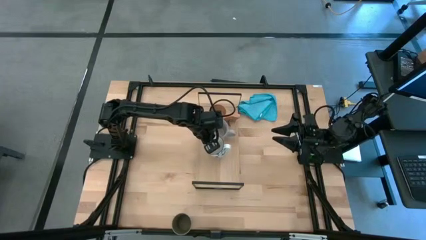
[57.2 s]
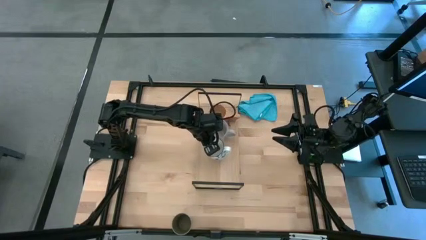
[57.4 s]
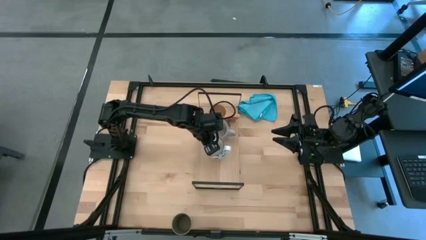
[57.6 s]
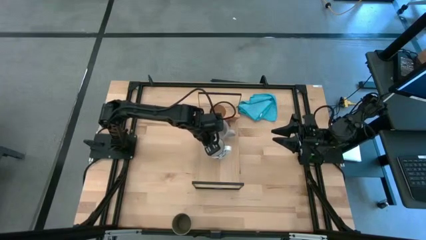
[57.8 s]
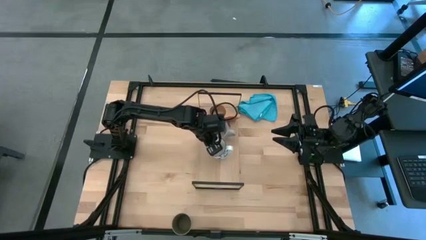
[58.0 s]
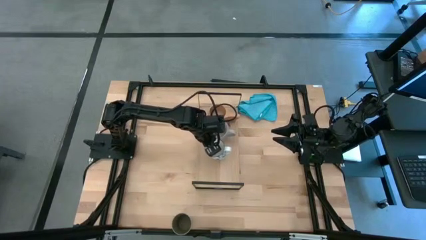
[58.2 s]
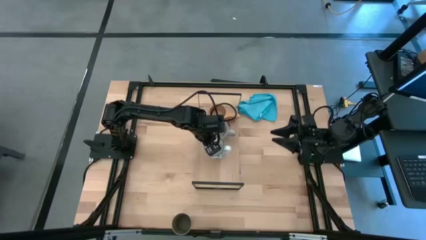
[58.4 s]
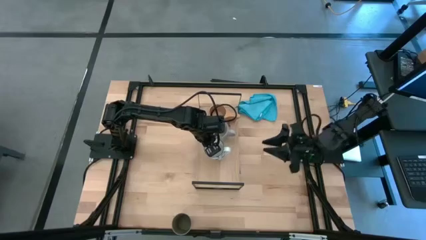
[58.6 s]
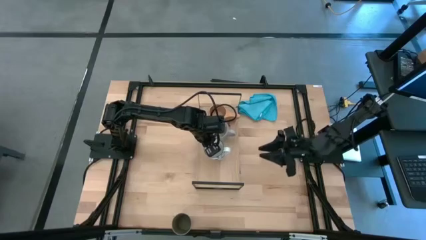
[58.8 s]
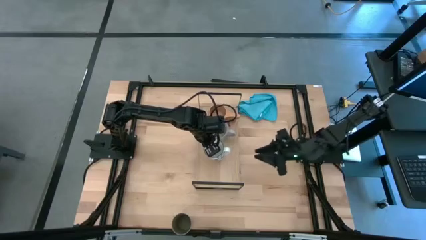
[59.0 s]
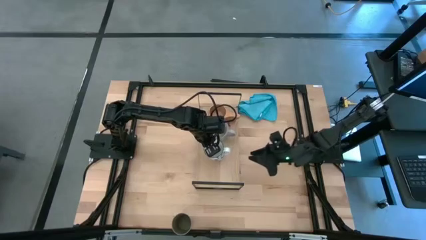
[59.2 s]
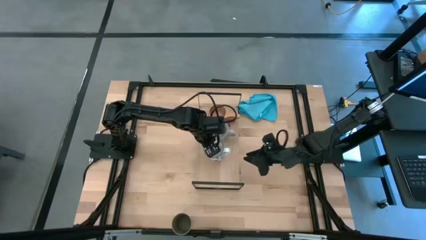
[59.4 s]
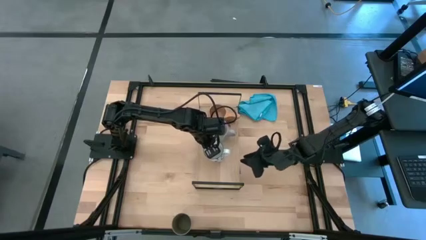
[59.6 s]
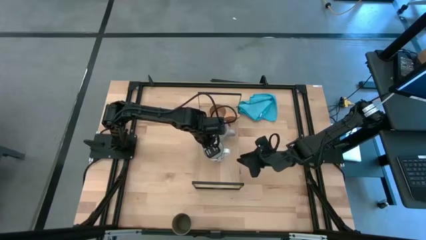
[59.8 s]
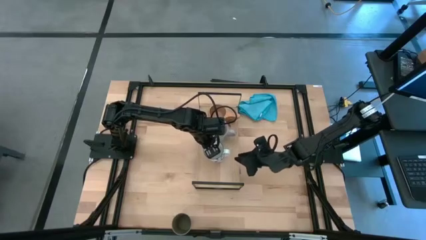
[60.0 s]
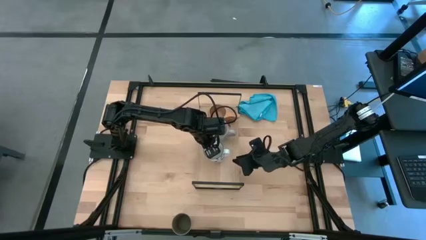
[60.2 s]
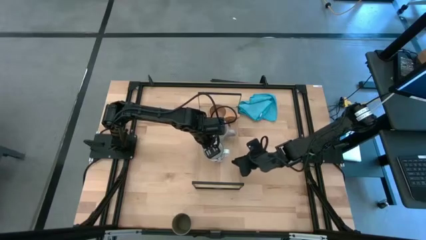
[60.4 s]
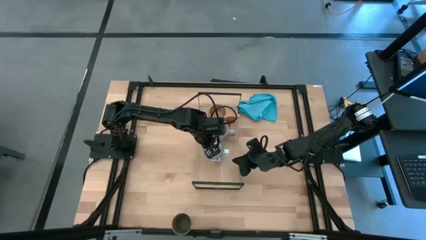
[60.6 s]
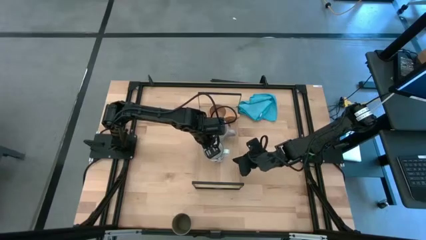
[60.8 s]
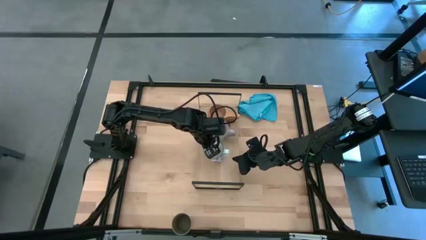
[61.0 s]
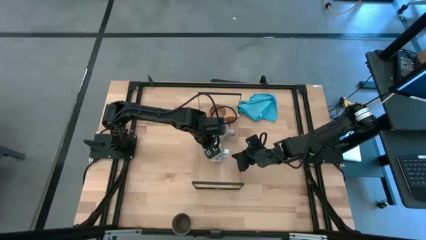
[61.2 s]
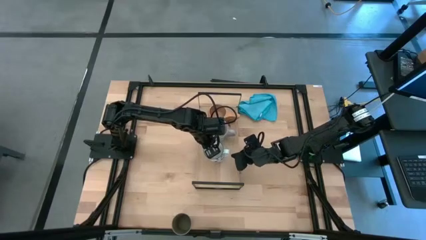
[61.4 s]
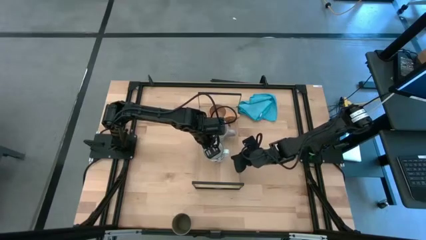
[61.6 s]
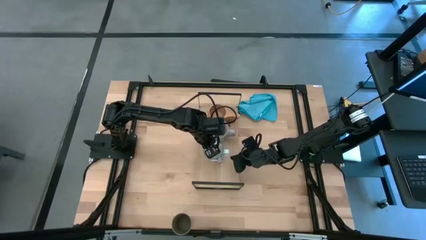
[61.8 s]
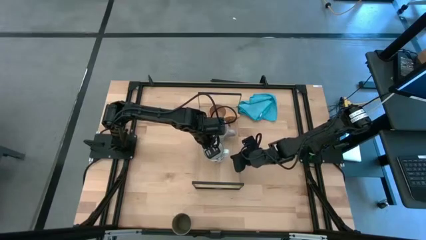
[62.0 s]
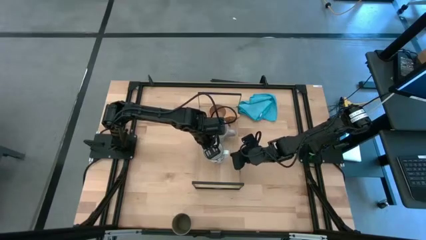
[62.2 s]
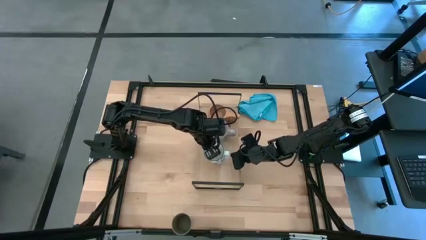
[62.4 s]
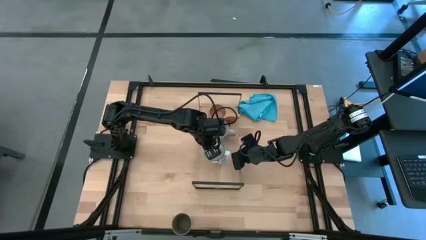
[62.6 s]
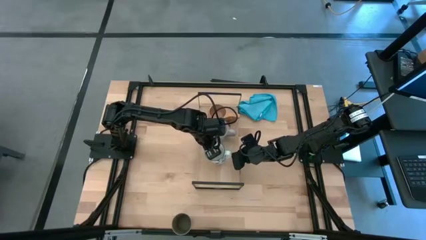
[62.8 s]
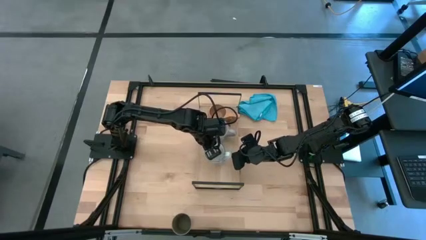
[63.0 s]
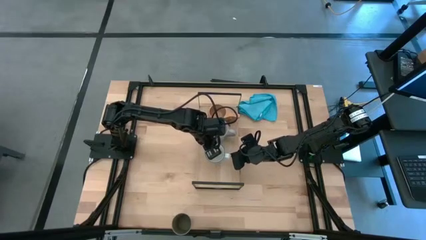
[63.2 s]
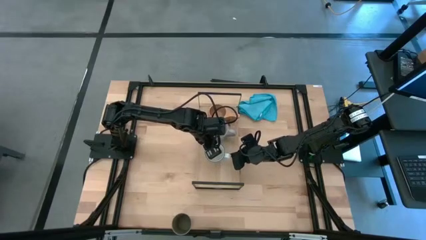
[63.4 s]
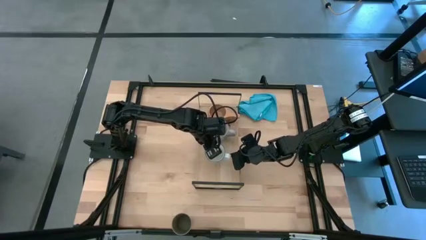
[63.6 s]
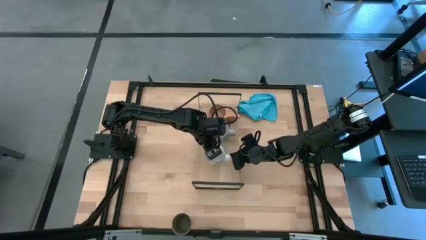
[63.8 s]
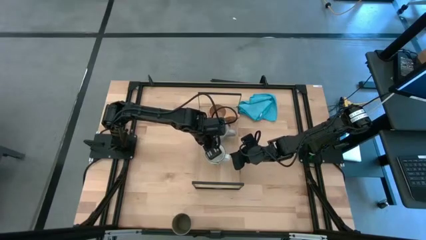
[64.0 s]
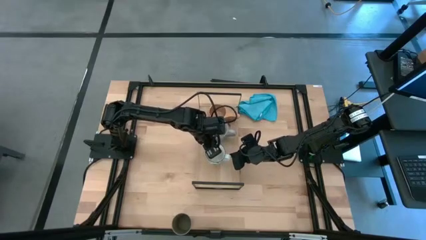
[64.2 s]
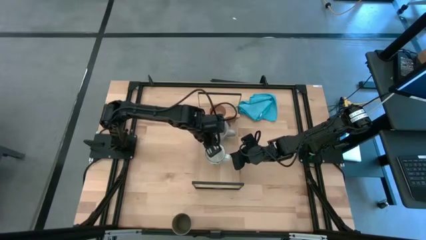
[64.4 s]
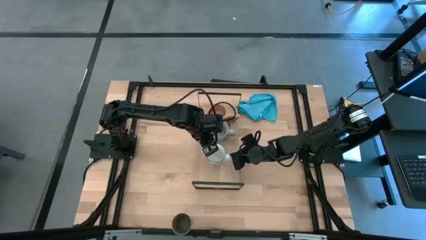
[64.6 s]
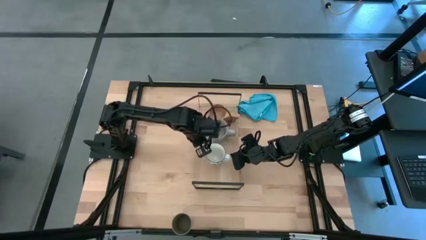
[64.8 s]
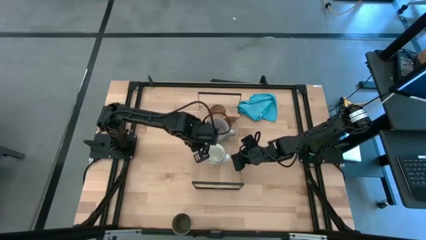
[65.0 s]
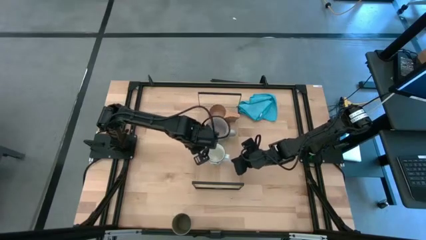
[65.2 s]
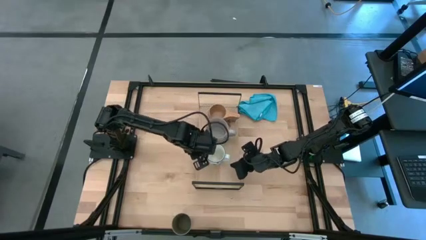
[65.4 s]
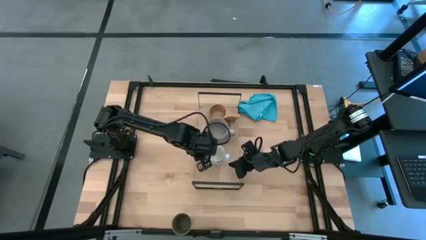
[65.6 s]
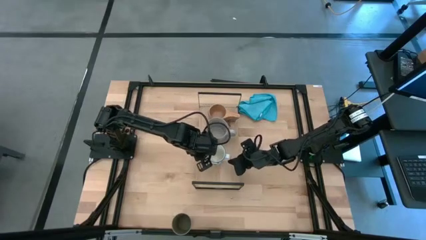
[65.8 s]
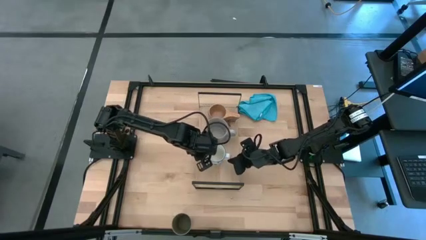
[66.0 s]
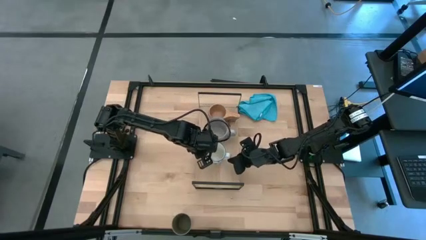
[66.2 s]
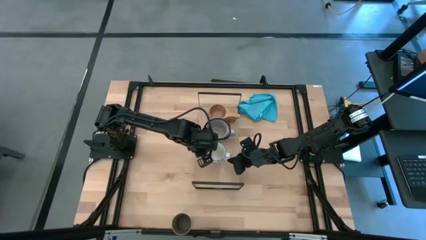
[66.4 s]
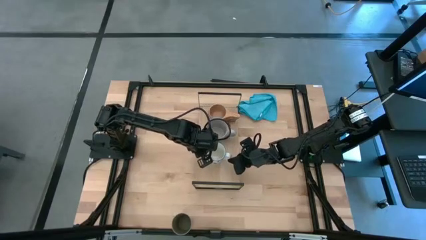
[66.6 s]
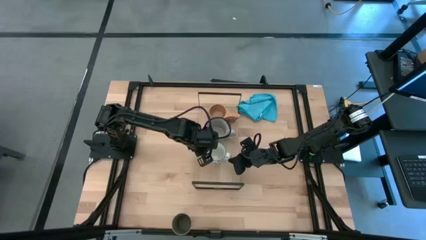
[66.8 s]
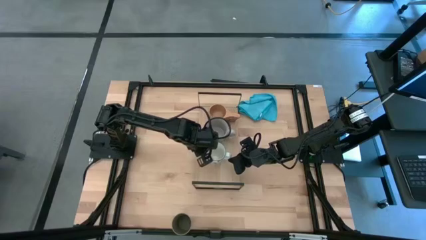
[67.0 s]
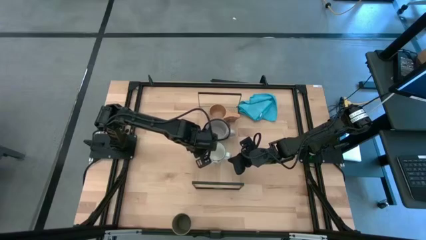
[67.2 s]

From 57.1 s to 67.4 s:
Task: Stack small to large cups/mugs on shelf
Put the blue mug on the shelf

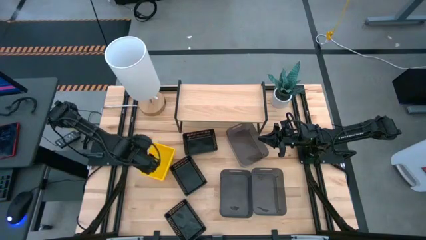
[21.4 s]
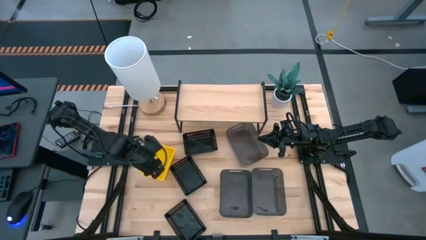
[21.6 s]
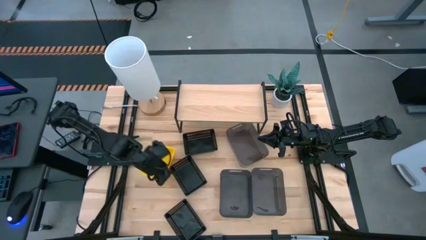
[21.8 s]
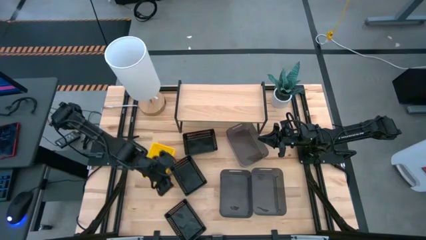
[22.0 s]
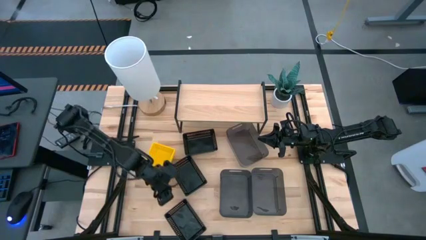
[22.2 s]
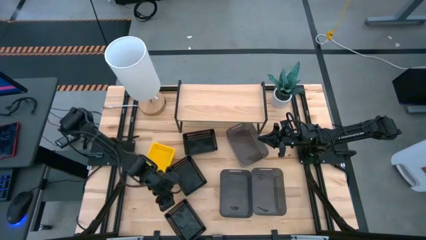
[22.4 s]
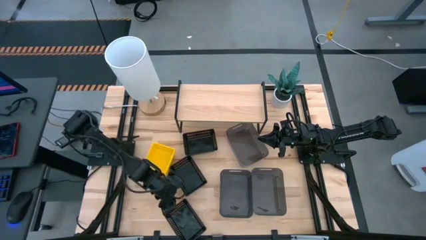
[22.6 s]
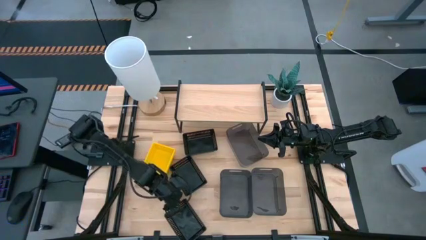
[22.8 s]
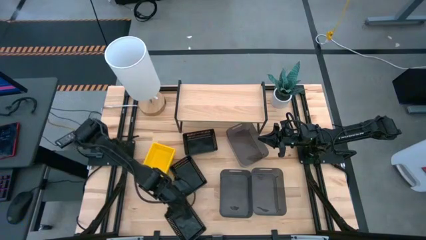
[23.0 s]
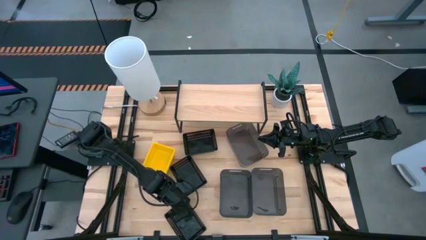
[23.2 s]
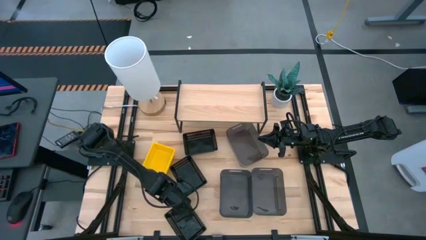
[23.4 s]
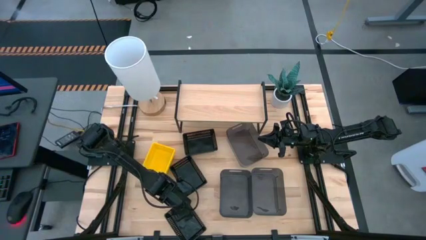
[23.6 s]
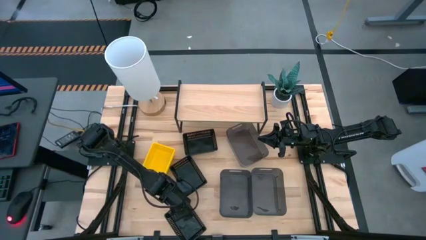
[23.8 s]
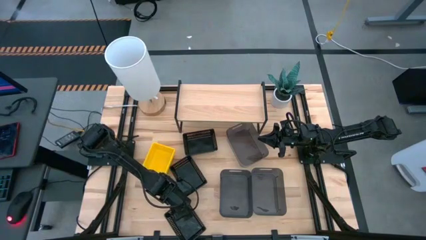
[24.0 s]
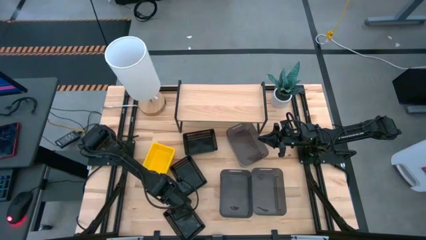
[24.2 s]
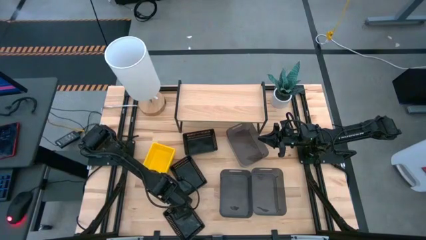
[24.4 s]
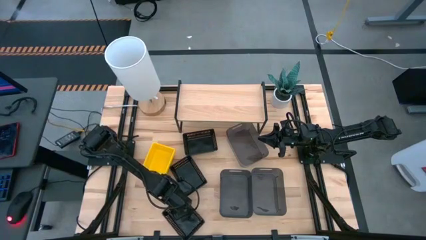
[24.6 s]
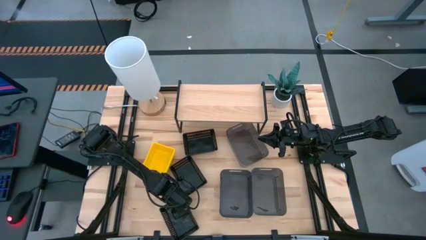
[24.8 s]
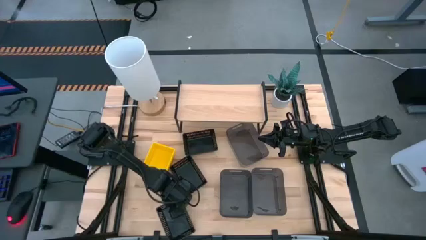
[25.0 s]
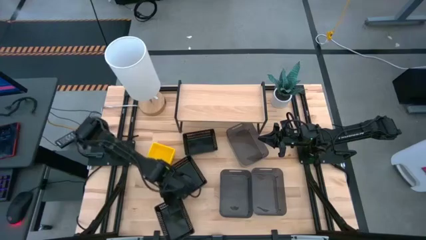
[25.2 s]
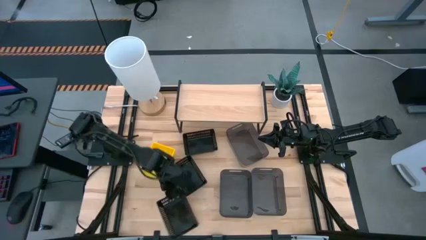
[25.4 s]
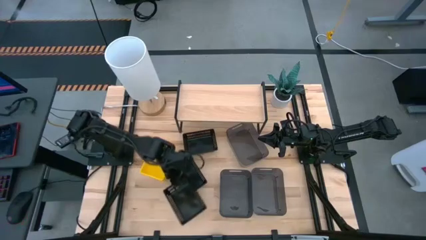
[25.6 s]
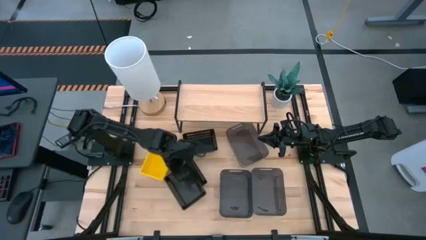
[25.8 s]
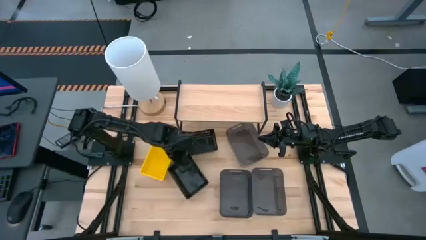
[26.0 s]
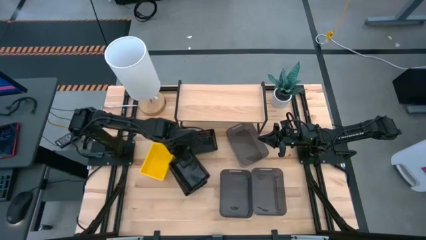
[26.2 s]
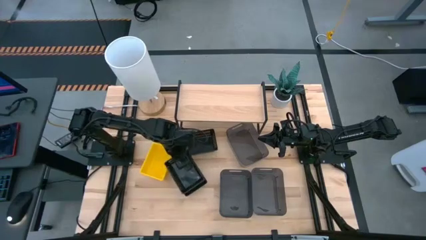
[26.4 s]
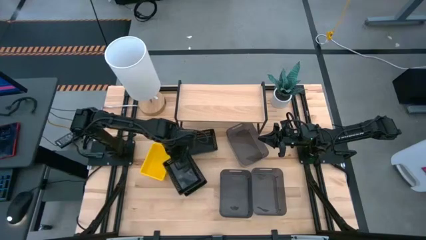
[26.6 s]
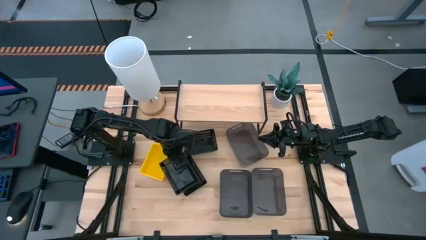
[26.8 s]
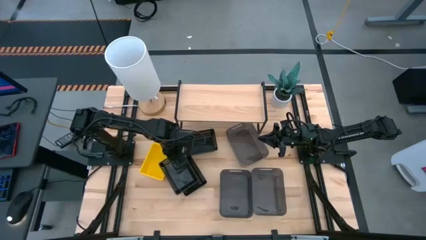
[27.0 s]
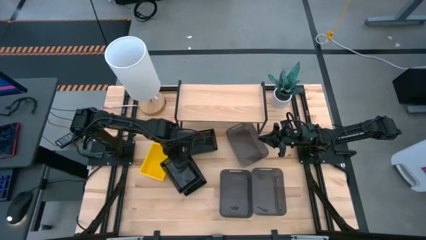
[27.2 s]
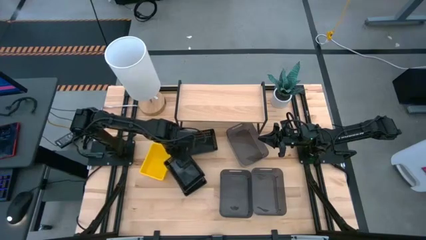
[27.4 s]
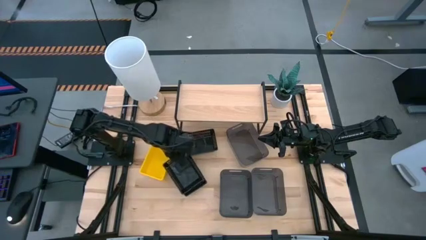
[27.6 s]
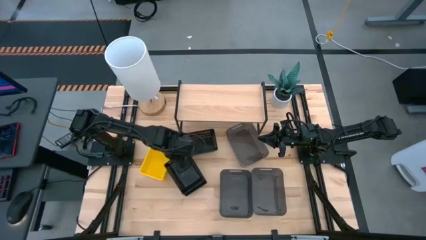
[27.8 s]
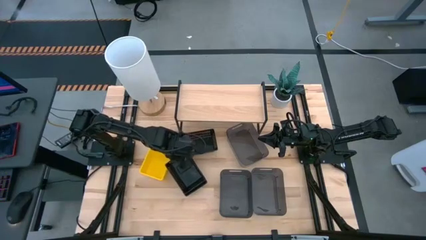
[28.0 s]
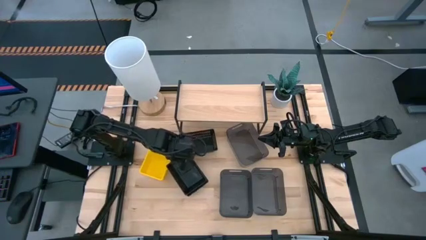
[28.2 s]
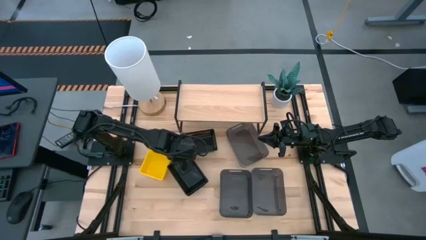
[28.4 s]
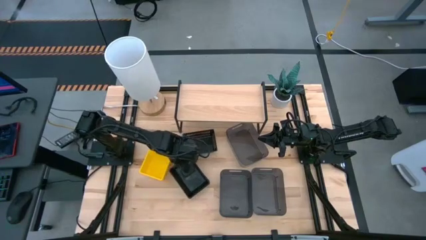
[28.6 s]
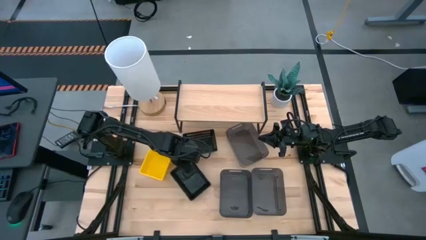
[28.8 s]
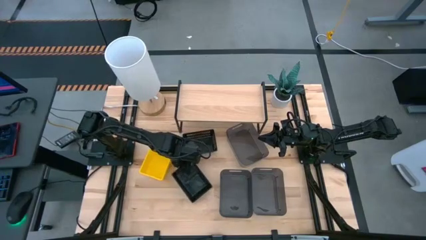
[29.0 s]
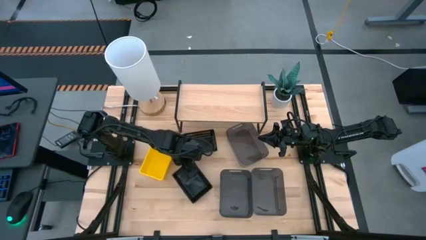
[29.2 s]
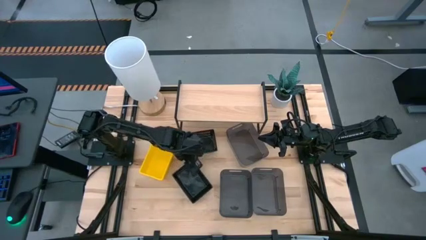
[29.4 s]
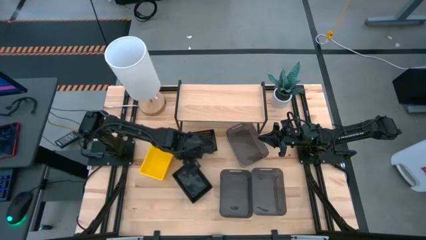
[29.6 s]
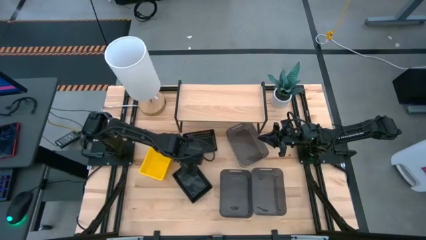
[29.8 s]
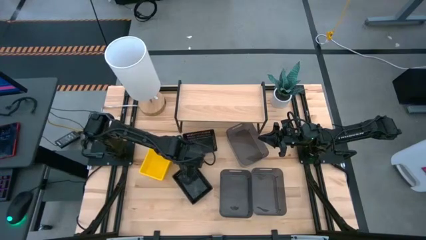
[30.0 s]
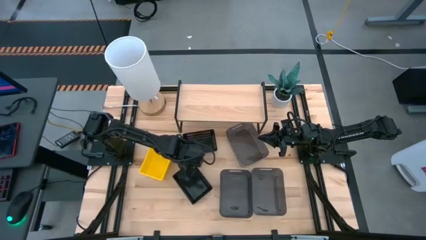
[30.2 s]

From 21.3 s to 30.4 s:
Task: Stack baskets on shelf by color
Stack the bottom black bin on the center black bin
